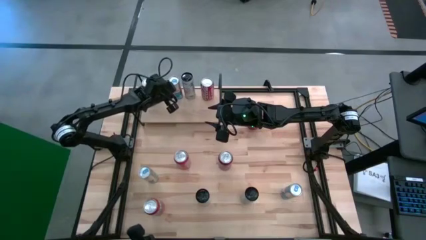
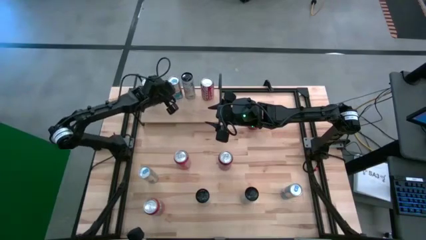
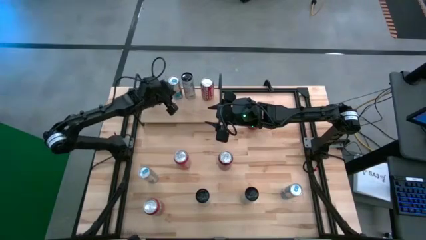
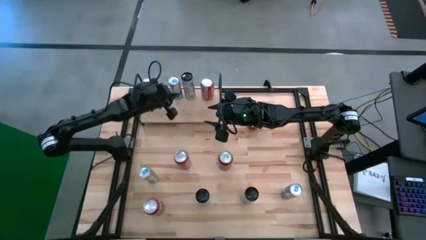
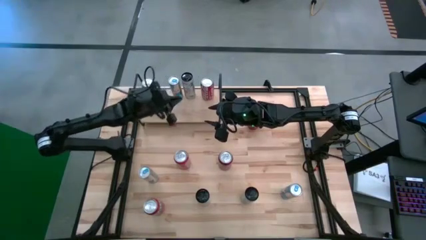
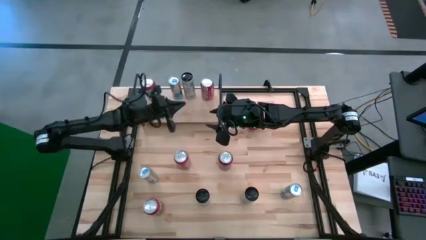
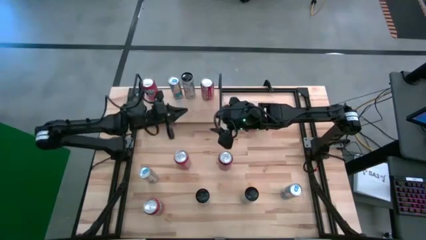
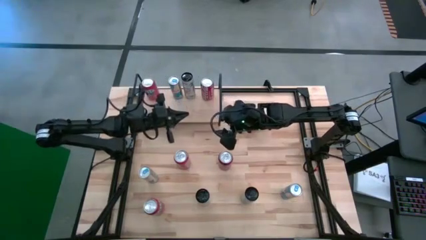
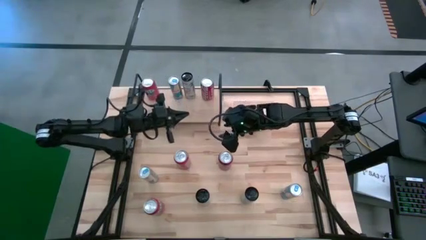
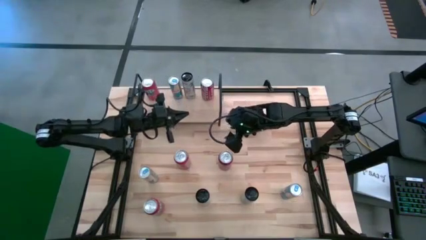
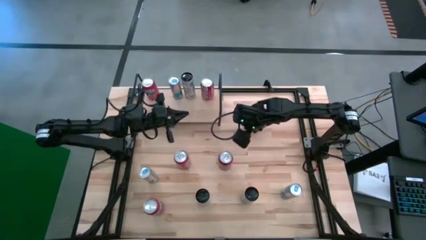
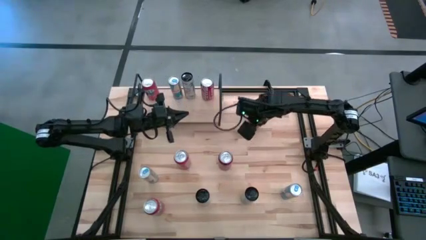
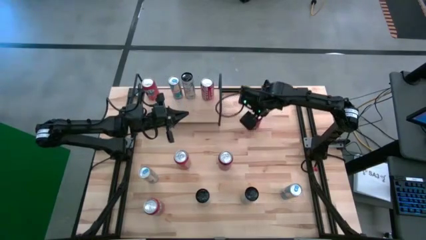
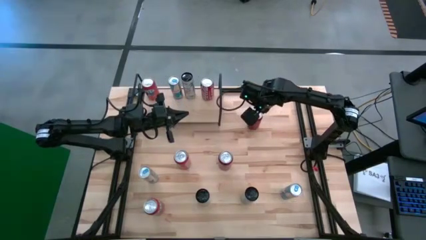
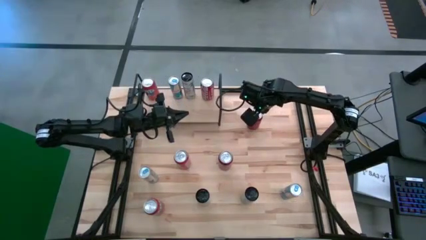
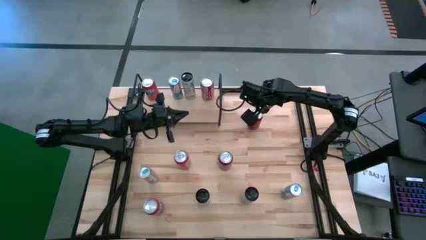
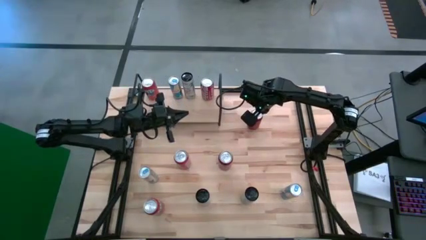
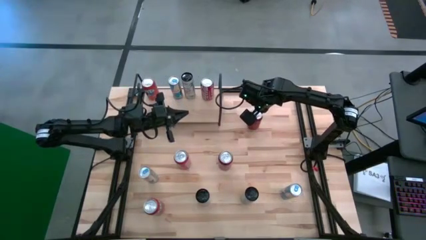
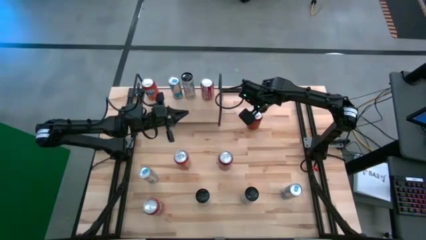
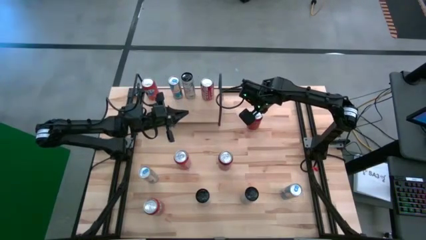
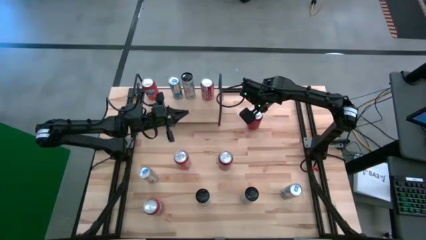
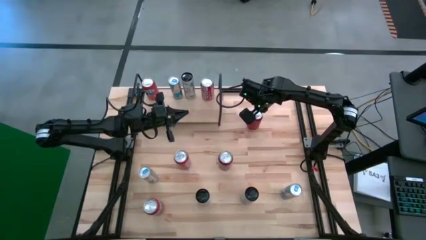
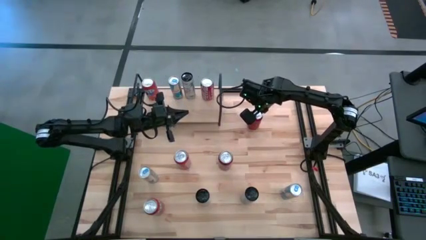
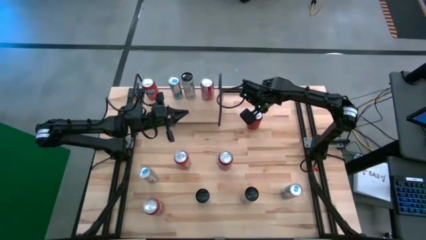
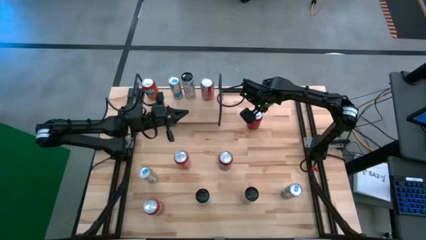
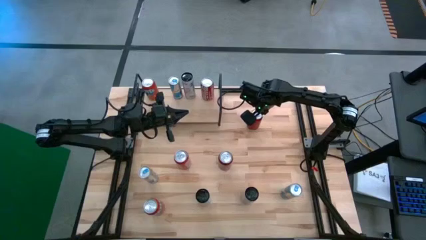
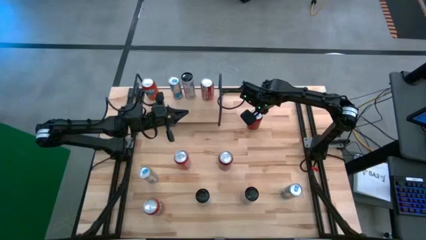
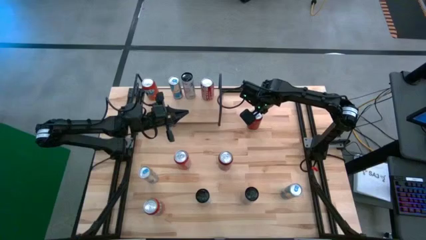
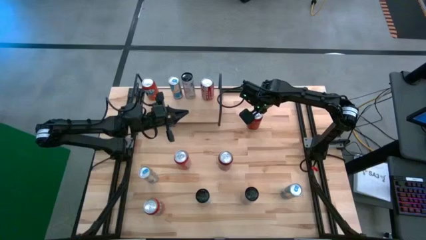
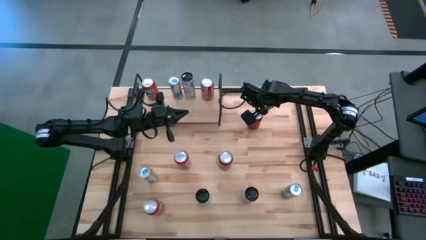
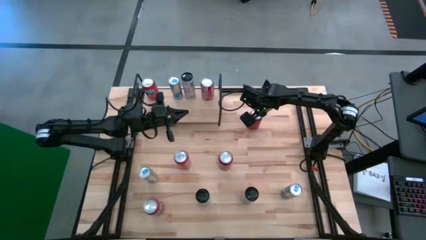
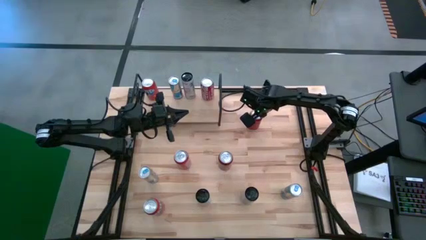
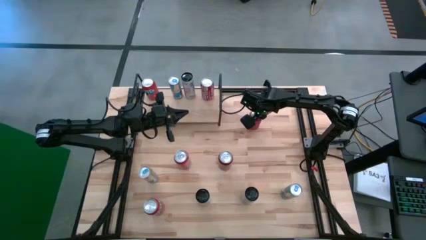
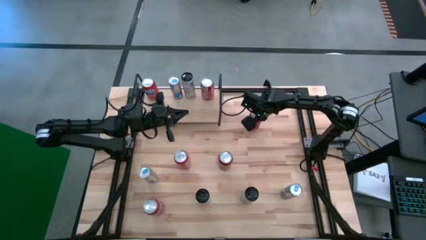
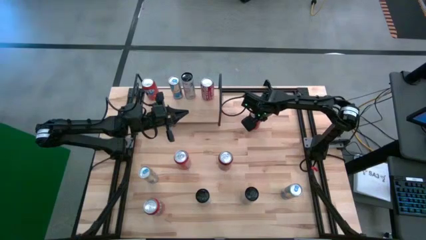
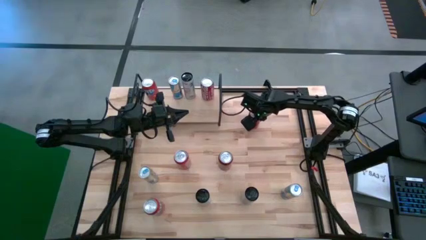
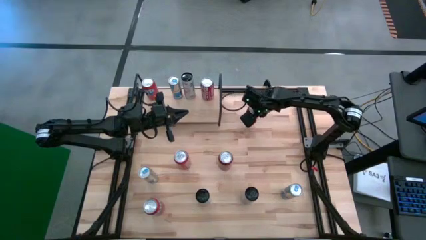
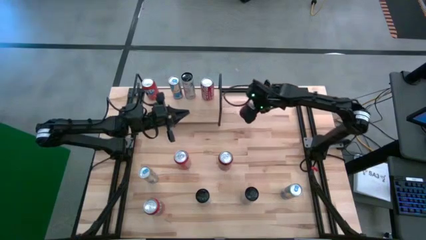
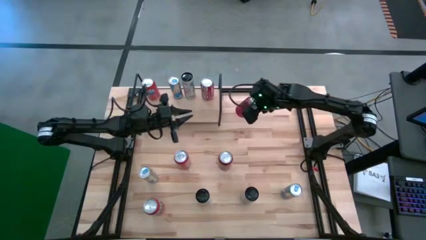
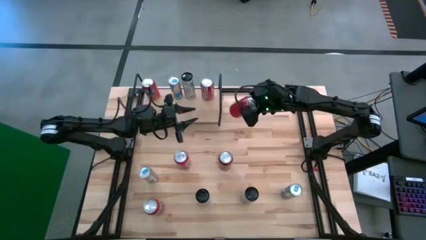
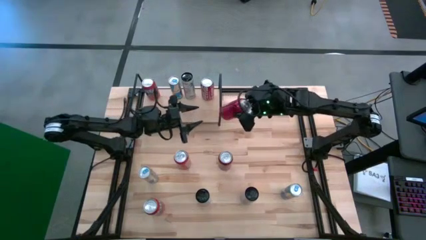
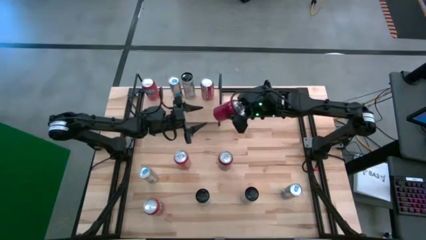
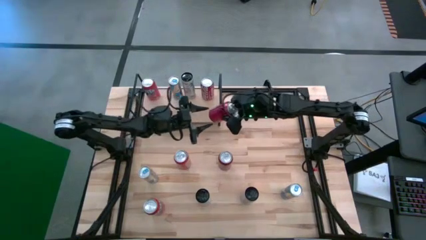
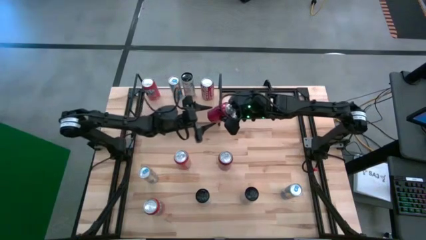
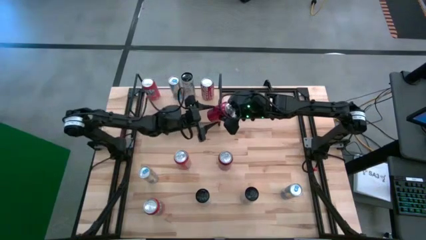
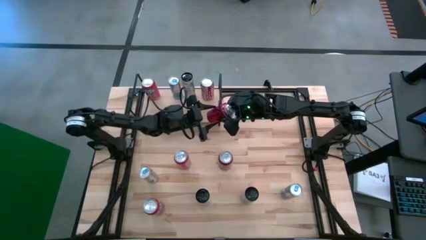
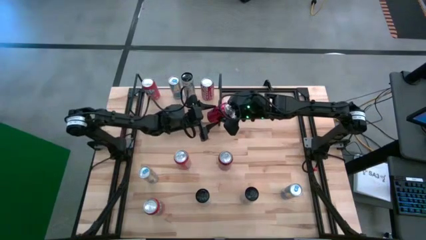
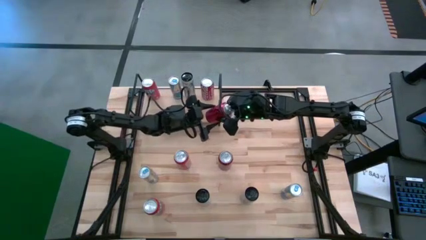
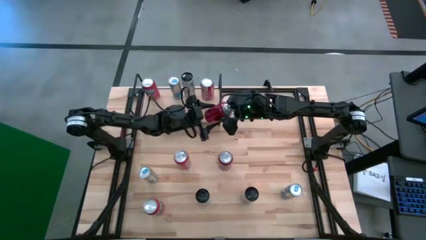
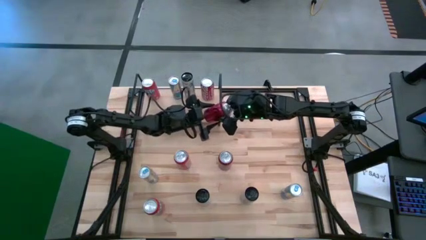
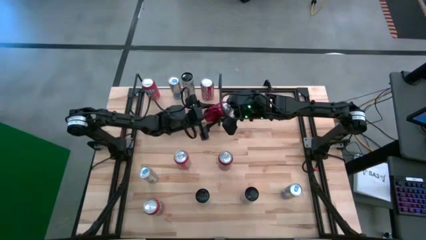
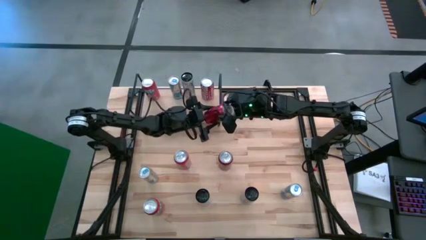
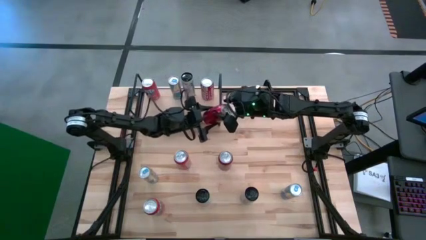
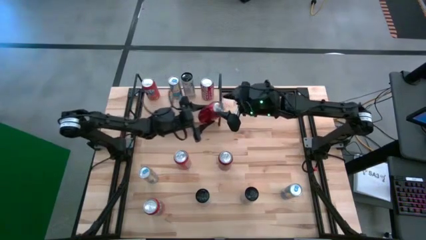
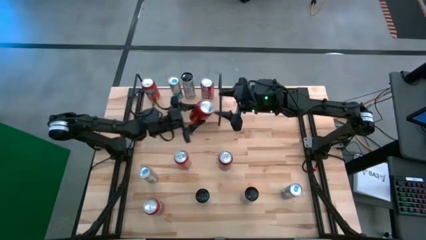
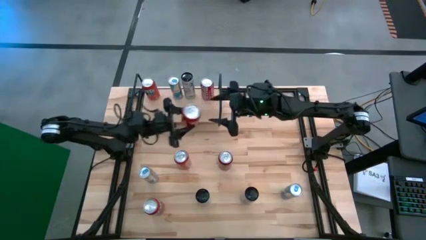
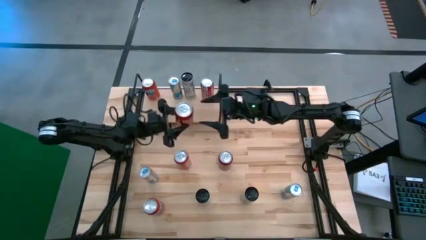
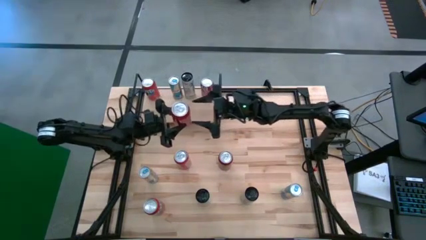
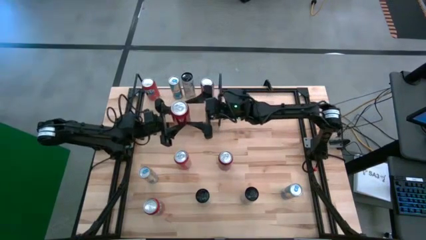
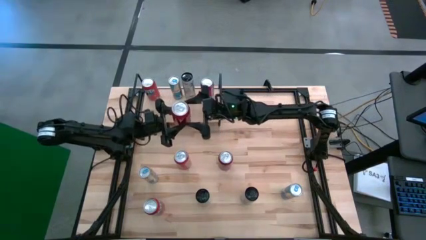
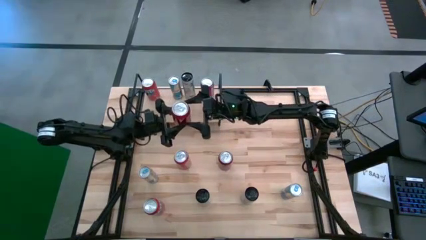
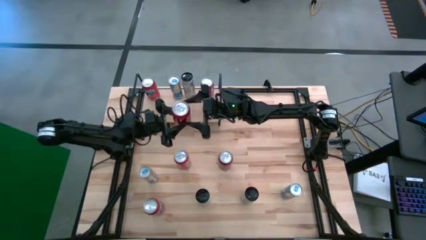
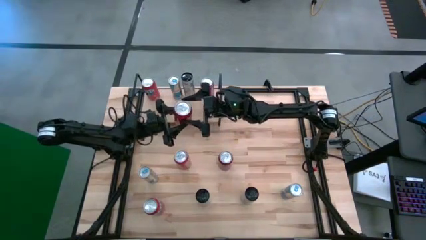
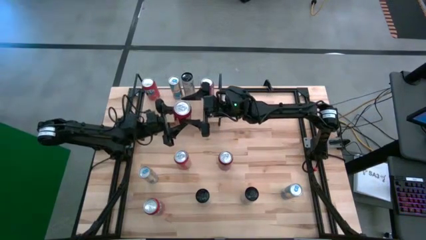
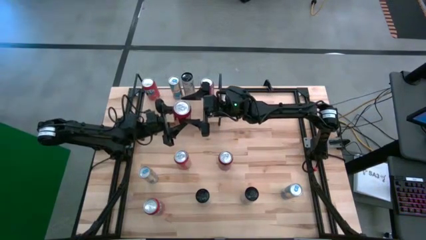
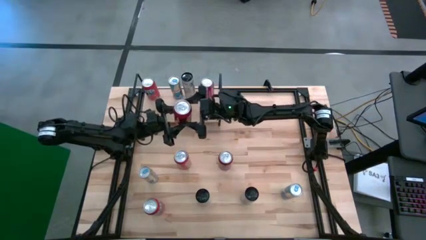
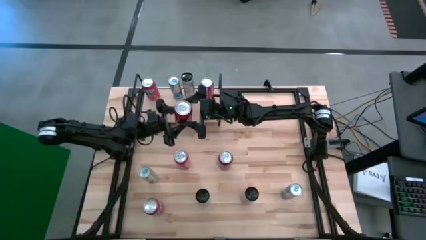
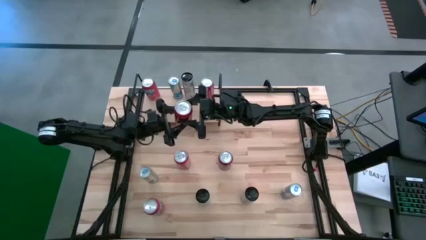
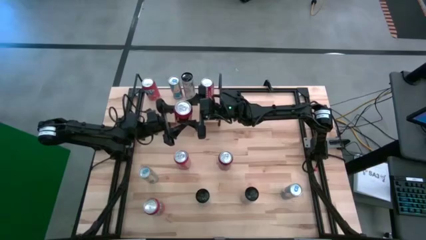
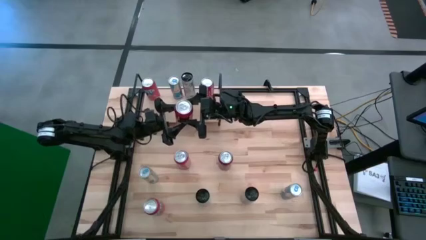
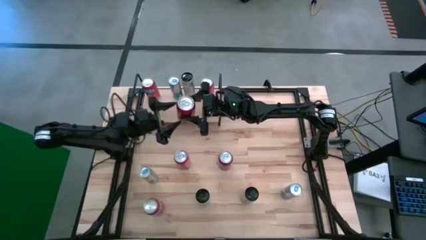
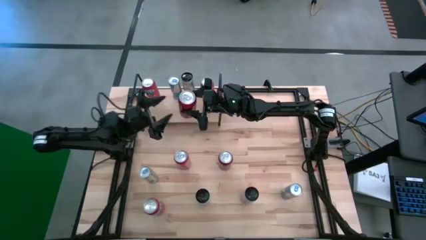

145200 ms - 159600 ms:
Task: Place canned beverage on shelf
Put the top red black soda can on the shelf
